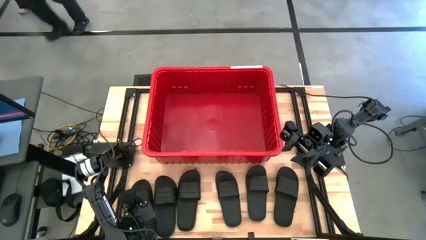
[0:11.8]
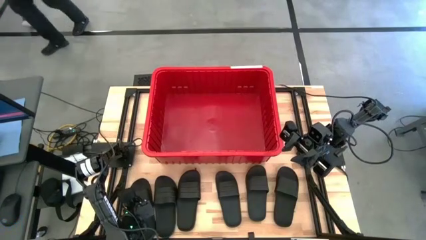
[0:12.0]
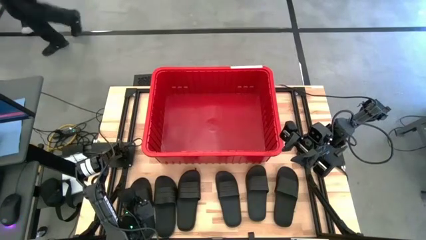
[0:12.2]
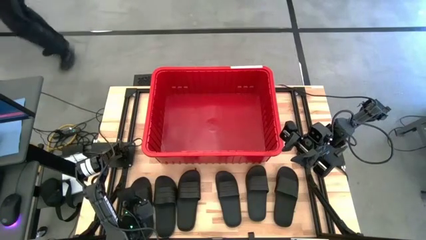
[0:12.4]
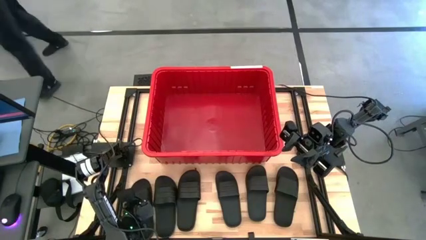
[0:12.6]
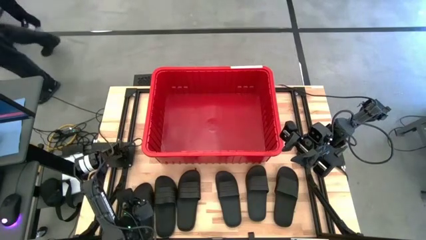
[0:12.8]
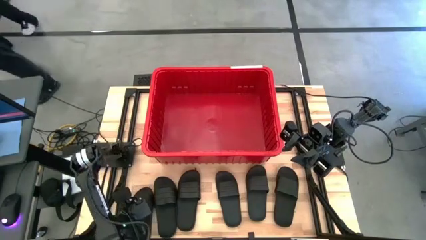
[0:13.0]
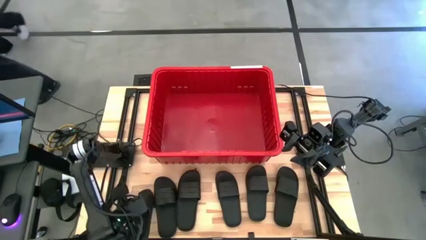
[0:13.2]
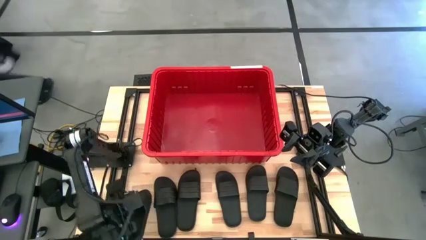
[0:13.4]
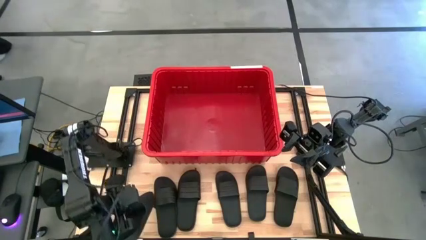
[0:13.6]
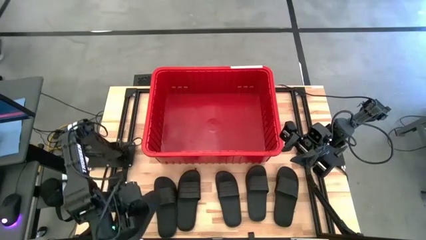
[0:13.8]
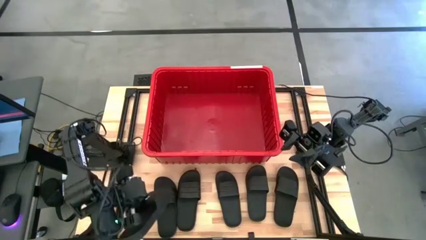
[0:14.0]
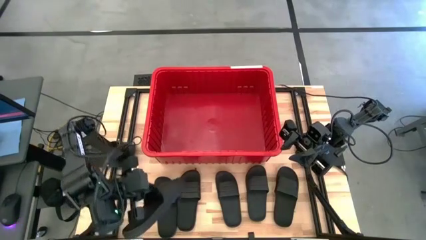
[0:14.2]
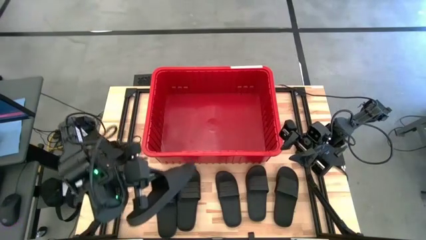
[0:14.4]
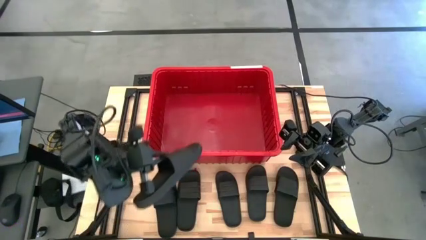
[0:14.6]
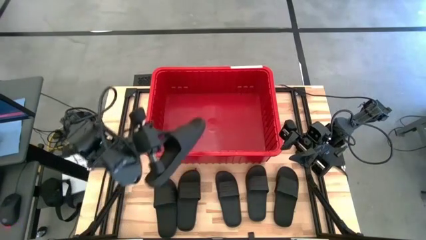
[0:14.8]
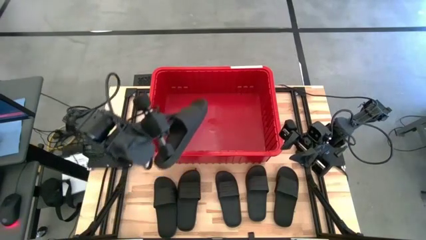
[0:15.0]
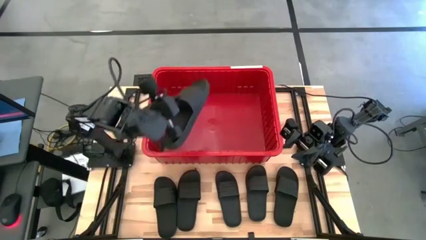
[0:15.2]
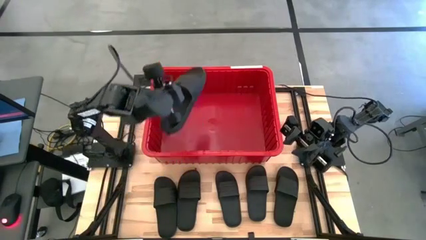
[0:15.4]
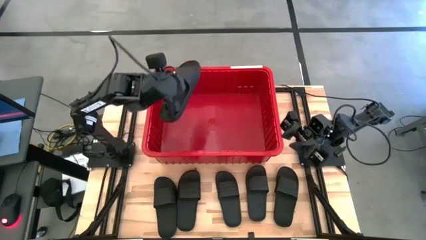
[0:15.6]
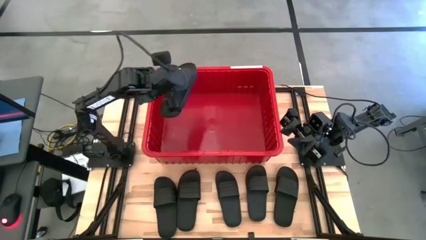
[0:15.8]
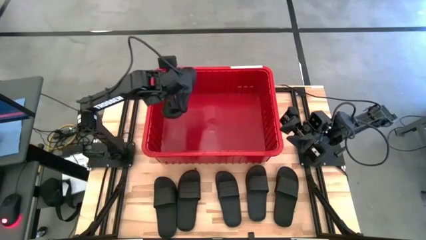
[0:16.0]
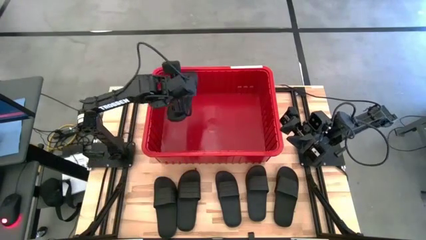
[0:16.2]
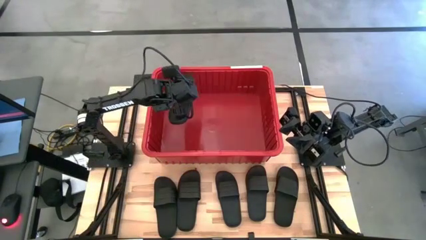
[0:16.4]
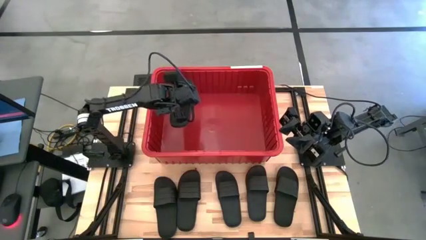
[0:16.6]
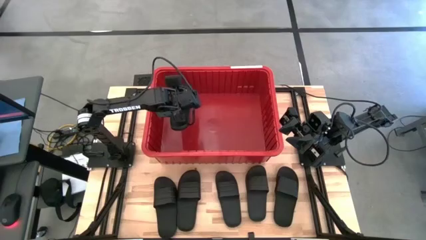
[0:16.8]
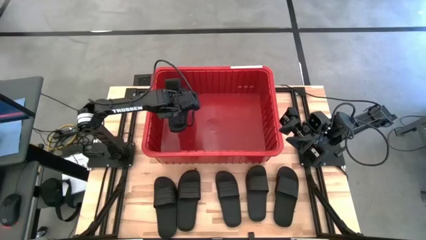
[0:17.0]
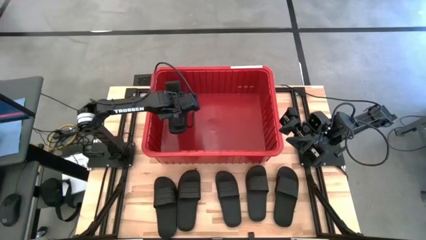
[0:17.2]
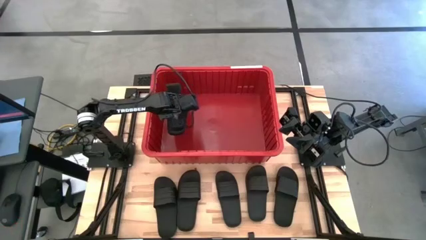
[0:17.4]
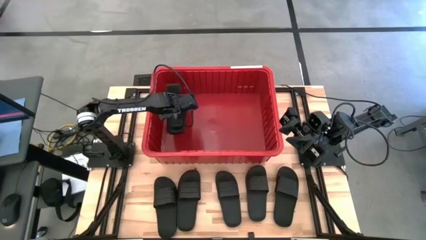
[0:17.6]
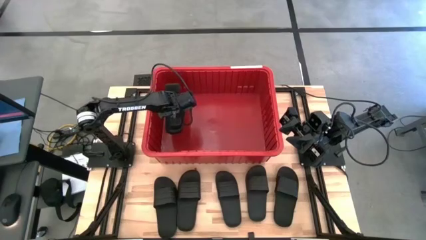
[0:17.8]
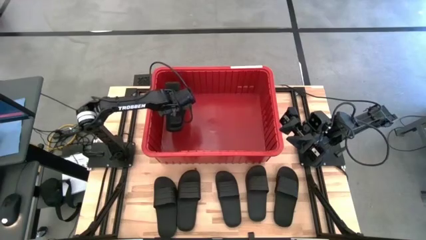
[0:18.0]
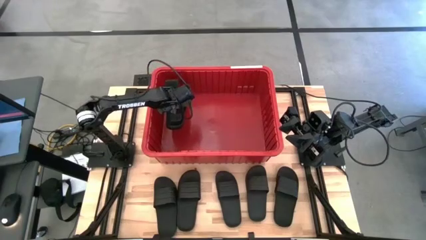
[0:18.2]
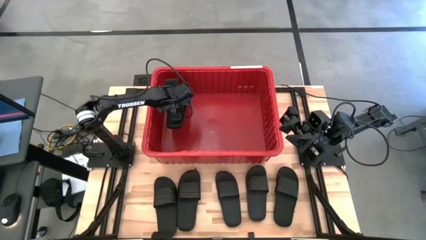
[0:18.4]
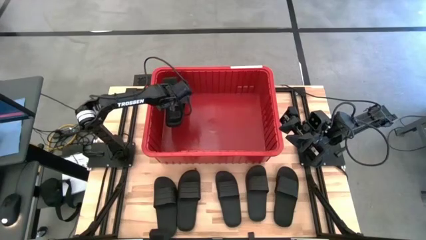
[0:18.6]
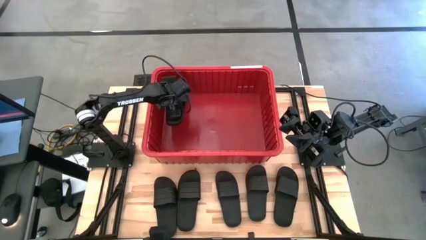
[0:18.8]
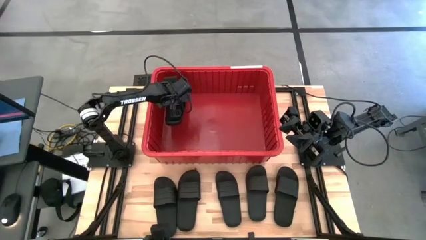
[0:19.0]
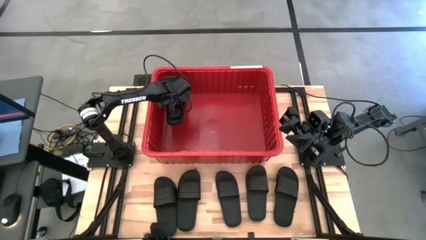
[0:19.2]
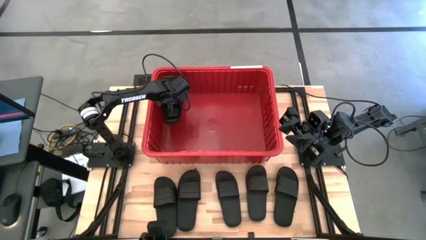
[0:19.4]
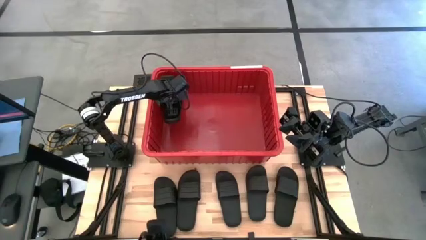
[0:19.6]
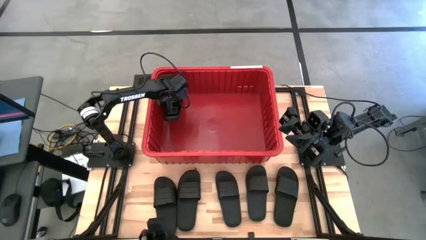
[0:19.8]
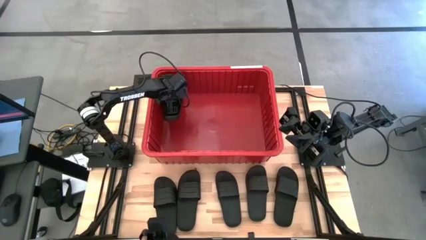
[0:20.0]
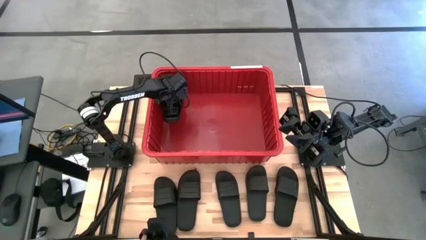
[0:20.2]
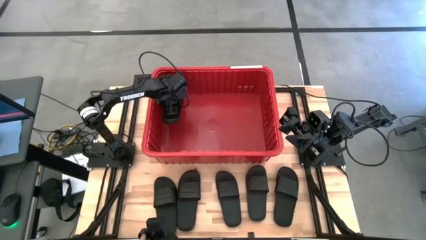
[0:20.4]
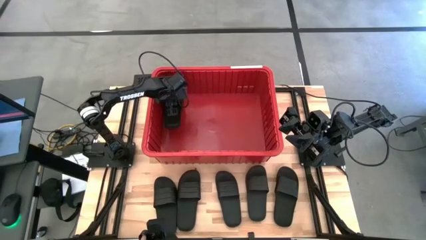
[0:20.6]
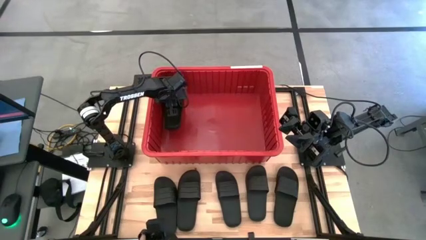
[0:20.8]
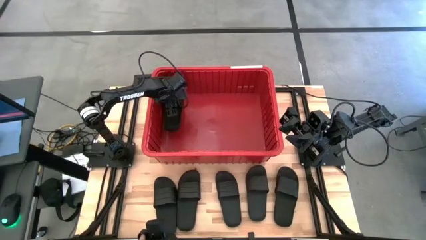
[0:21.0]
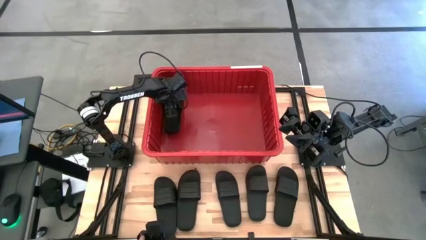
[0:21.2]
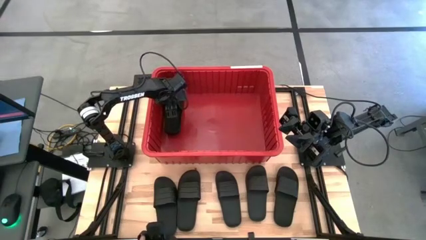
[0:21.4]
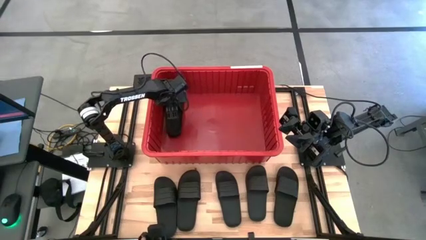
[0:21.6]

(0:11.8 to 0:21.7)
Task: Pick and place slides into bin
Put the black slides into the red bin
